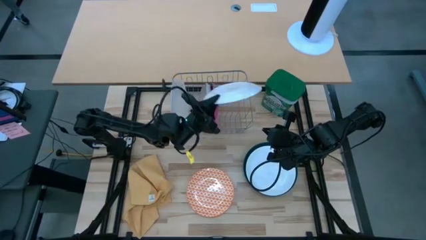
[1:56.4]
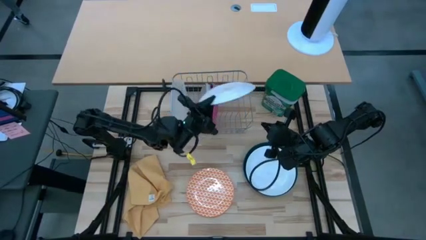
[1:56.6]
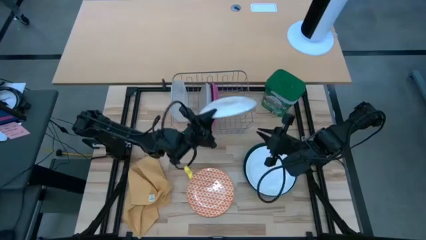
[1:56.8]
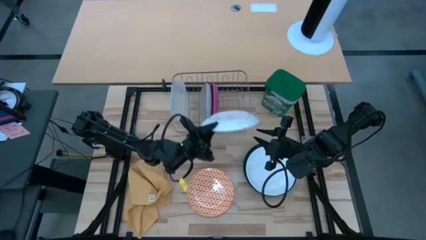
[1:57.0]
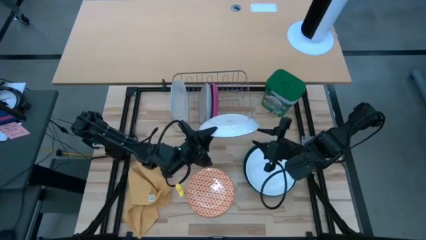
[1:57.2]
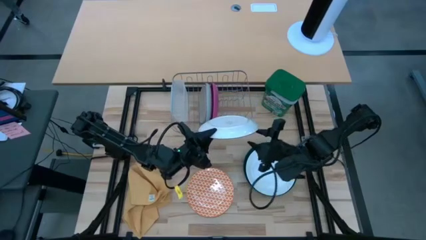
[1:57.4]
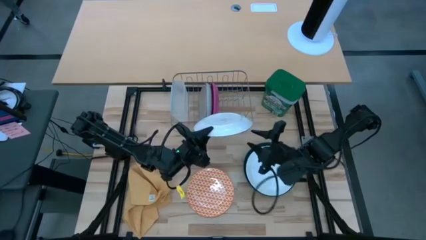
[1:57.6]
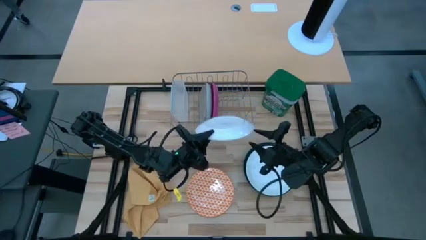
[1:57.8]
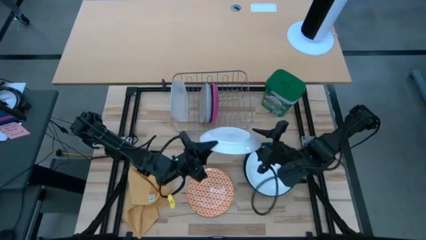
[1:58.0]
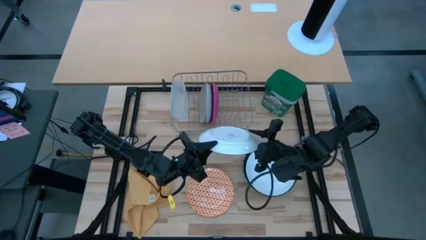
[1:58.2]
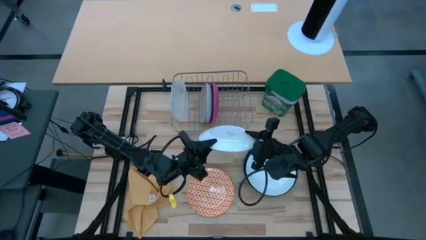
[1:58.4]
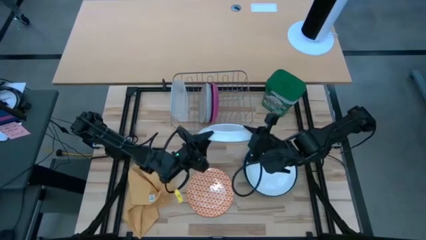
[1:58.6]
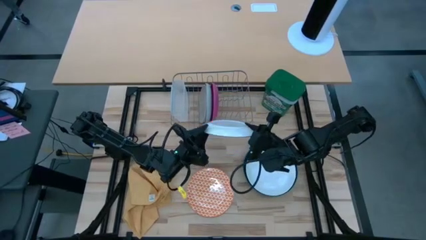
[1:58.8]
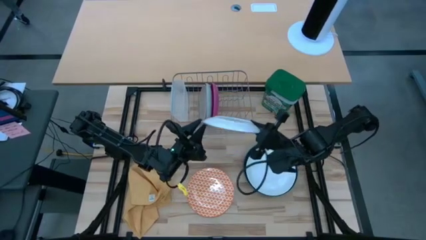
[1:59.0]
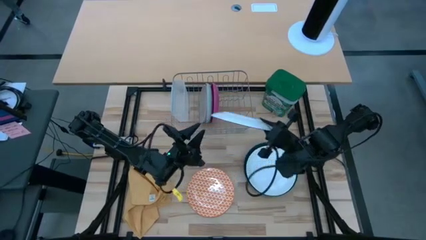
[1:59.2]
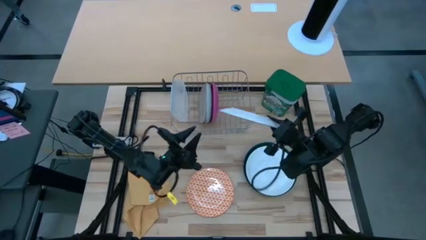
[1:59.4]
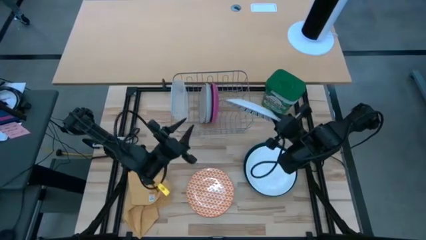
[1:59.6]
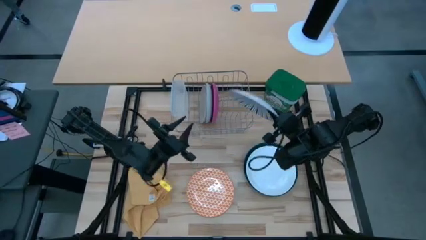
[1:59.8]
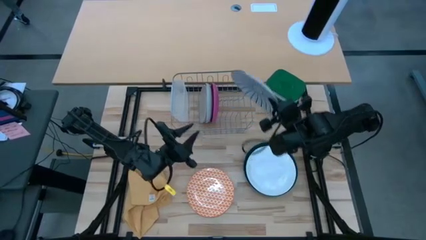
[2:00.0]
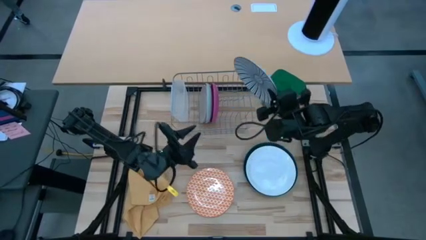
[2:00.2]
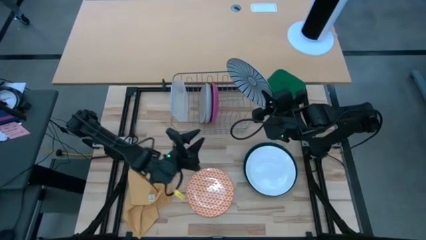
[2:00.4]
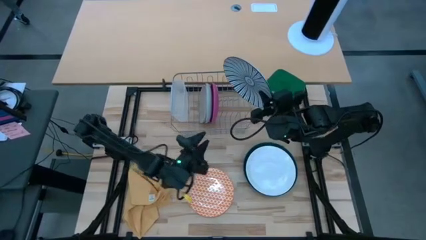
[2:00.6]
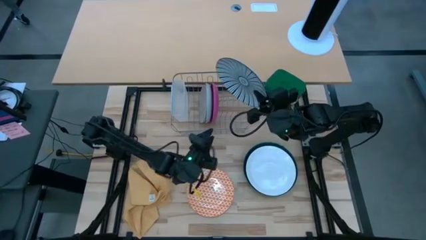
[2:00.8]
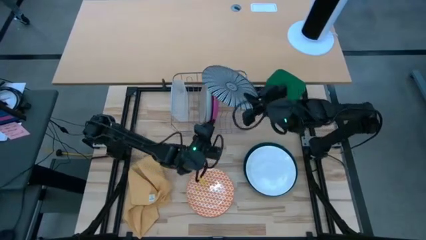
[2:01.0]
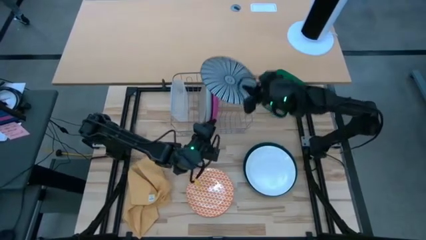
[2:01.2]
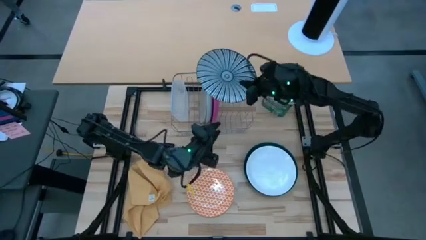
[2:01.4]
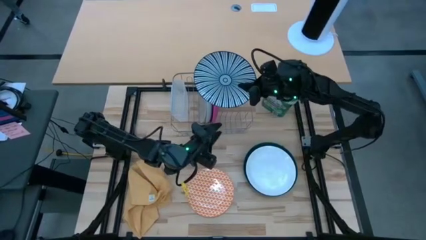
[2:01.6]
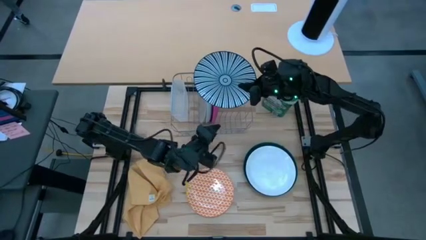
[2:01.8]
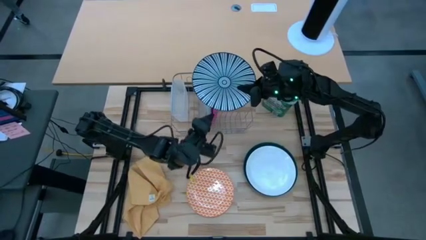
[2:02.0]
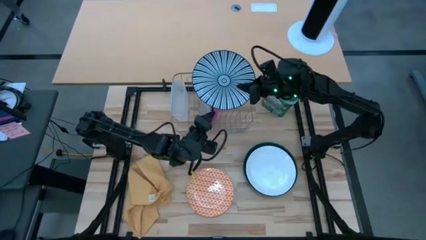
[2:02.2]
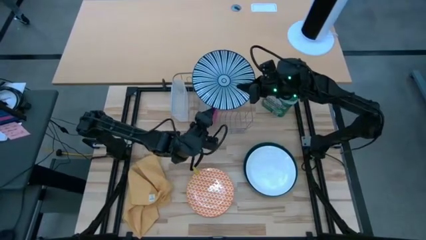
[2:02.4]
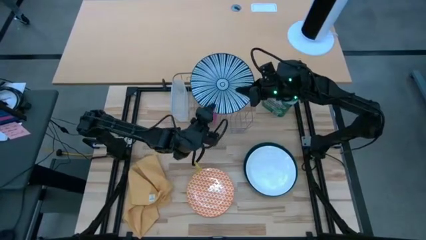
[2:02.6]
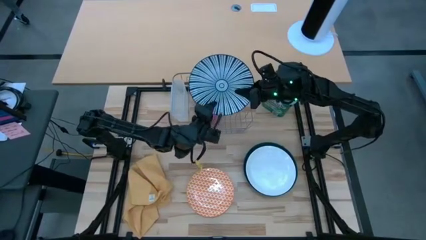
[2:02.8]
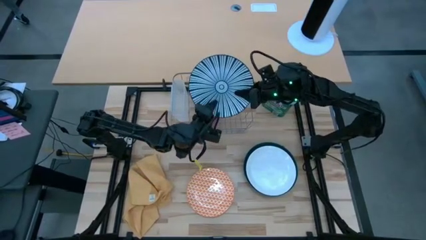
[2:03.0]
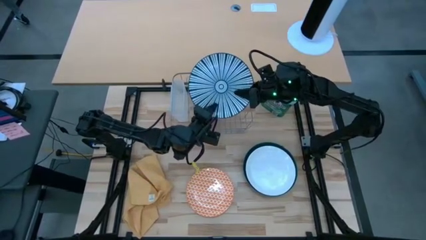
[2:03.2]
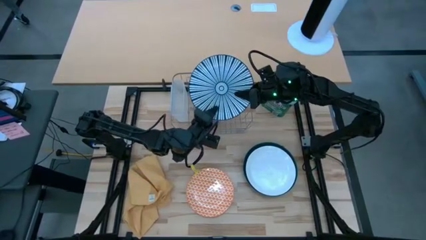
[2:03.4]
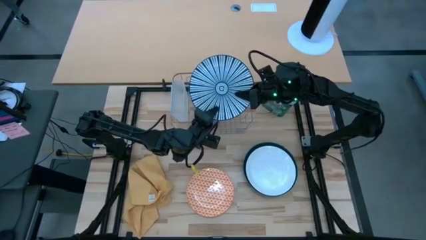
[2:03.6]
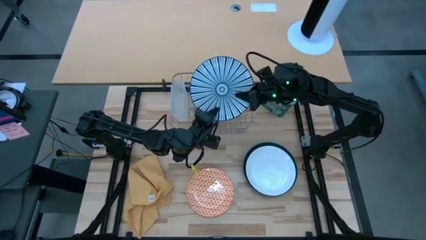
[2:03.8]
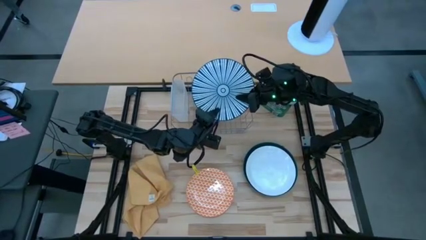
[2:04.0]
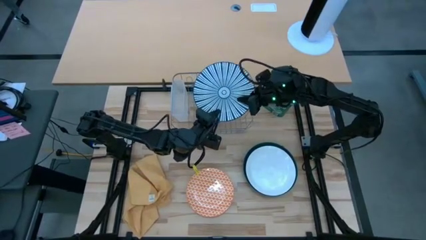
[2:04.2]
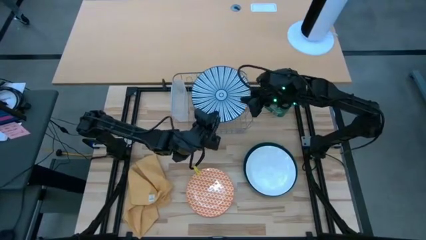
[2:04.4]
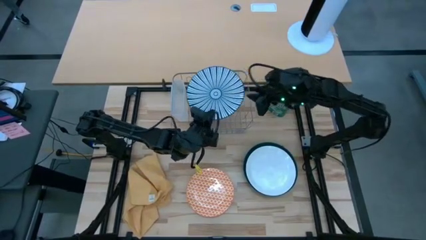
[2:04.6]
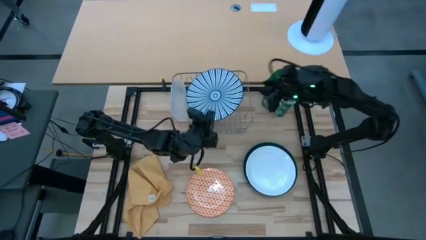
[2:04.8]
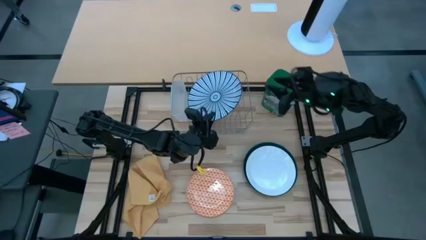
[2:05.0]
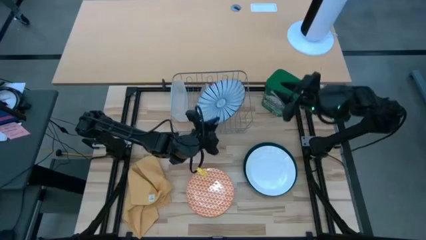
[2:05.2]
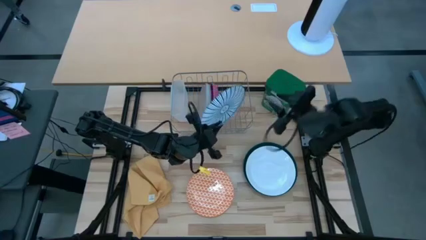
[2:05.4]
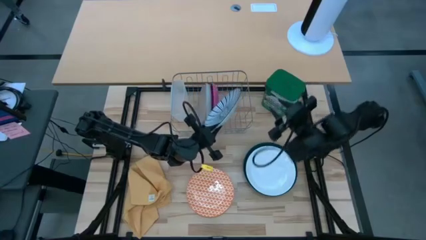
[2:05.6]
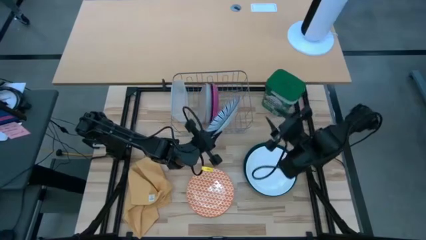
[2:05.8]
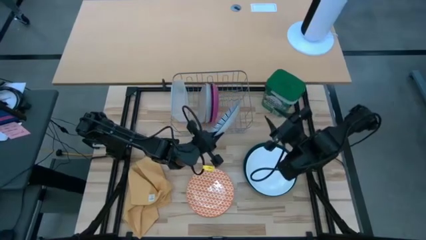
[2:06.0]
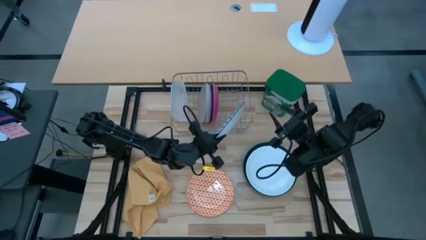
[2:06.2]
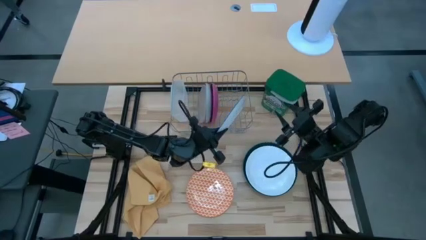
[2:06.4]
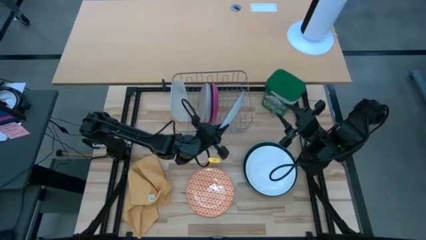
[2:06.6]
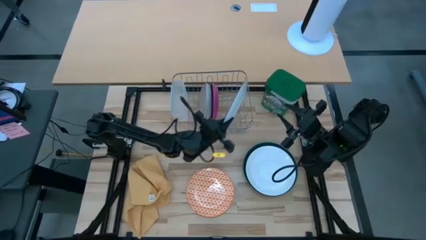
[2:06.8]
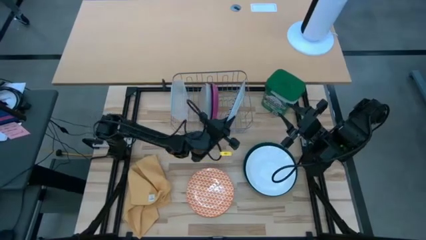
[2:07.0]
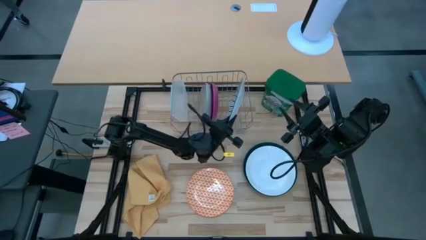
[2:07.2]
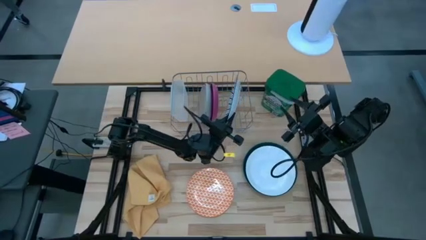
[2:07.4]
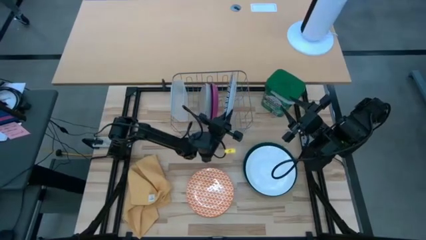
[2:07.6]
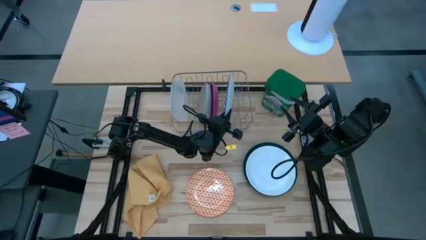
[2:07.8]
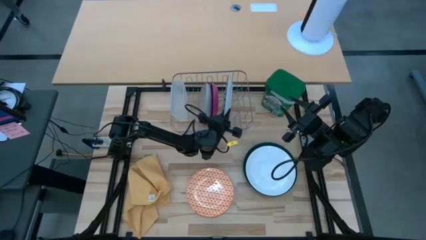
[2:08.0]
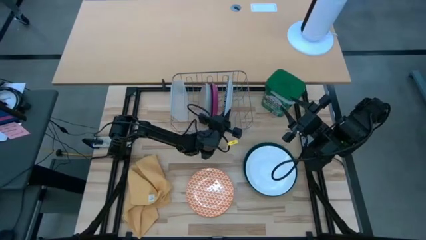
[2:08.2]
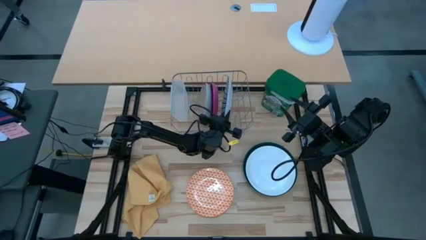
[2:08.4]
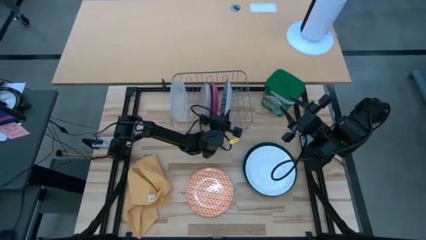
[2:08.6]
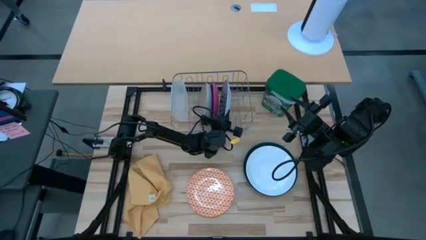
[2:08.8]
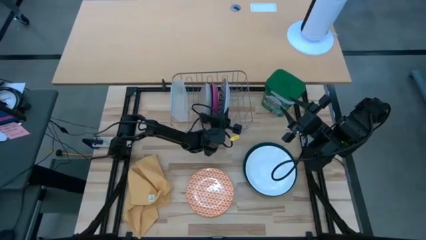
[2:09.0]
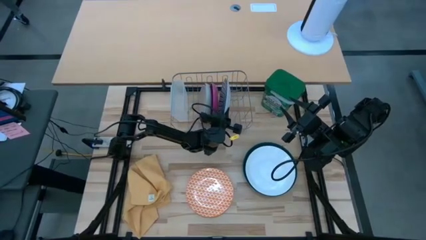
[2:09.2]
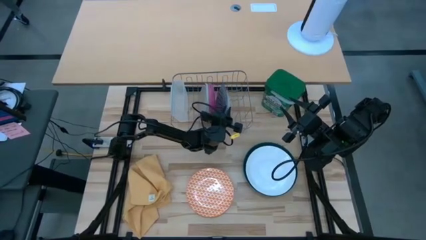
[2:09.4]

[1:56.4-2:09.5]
Task: Sort dishes
Put the blue patterned plate into the dish rack

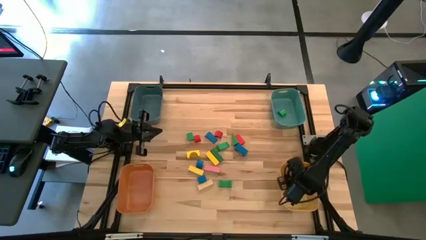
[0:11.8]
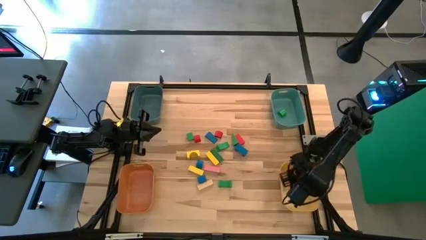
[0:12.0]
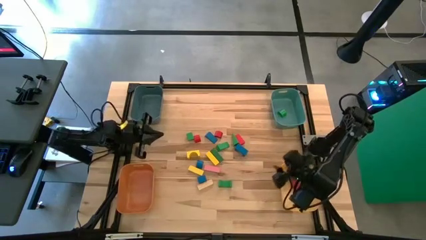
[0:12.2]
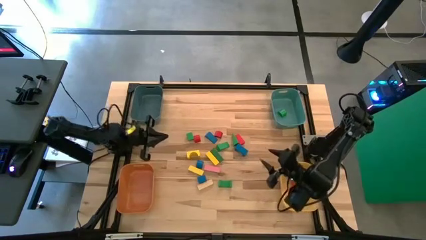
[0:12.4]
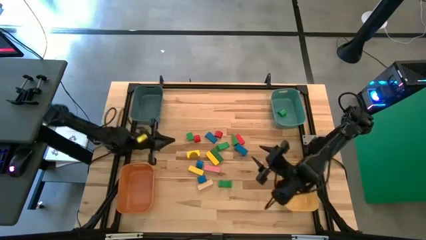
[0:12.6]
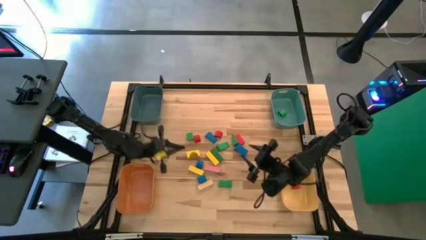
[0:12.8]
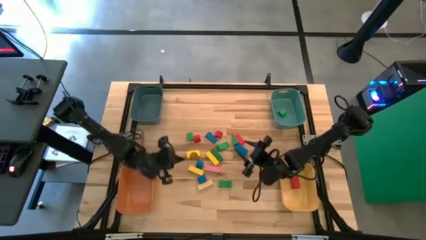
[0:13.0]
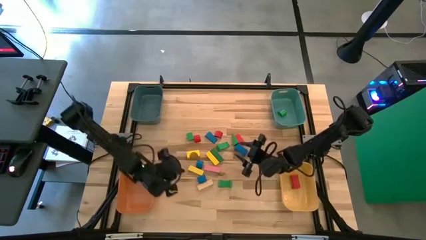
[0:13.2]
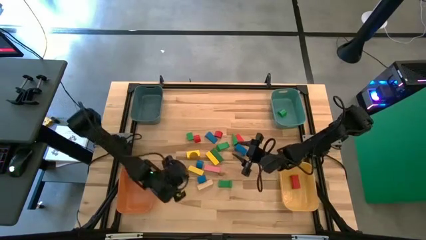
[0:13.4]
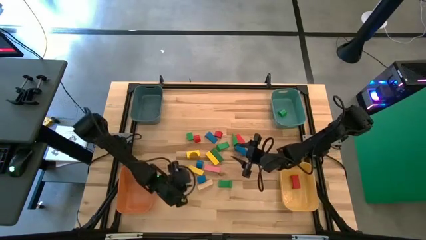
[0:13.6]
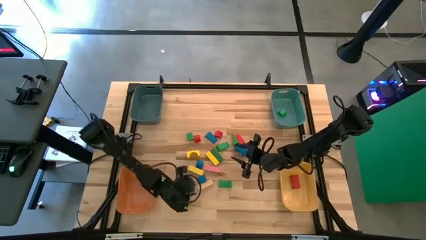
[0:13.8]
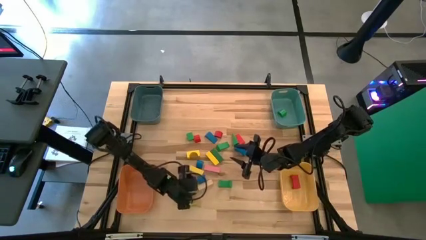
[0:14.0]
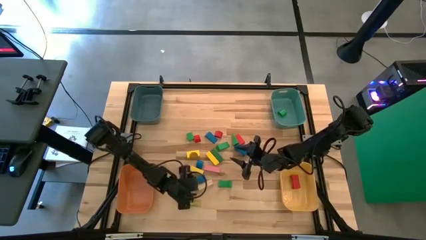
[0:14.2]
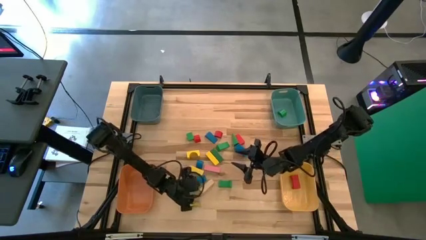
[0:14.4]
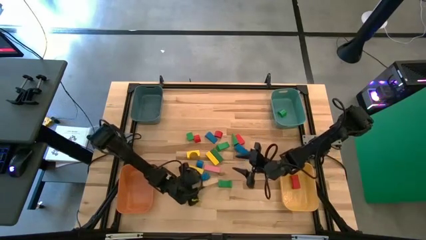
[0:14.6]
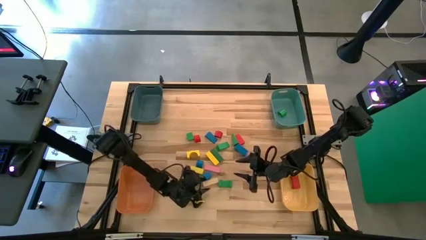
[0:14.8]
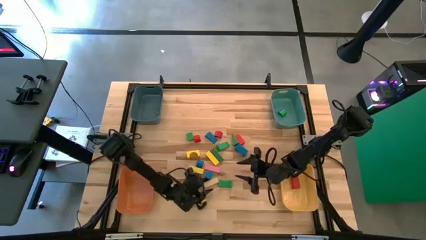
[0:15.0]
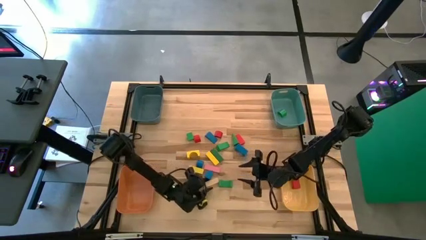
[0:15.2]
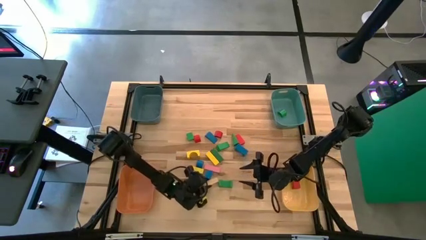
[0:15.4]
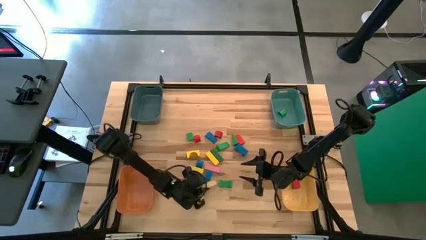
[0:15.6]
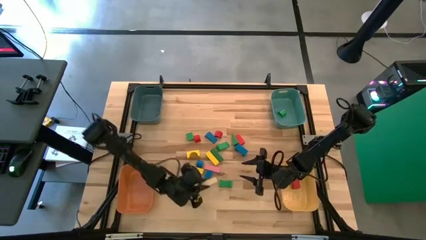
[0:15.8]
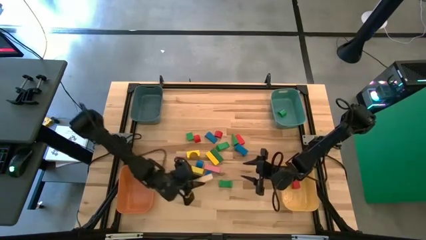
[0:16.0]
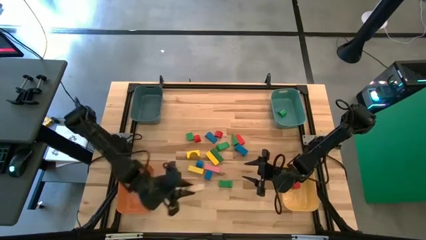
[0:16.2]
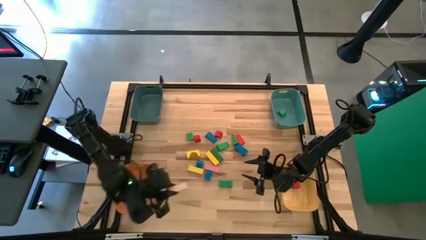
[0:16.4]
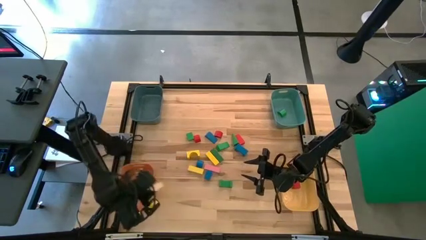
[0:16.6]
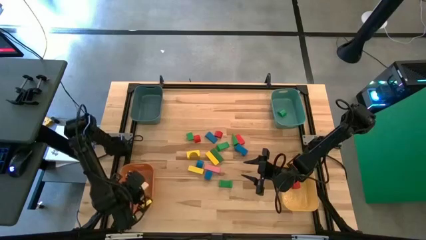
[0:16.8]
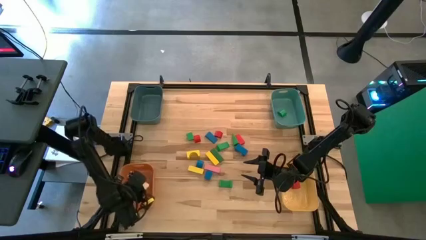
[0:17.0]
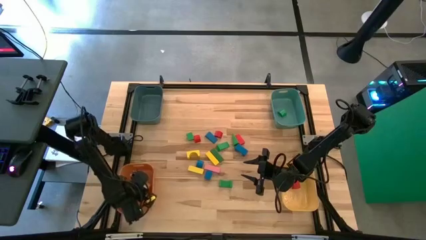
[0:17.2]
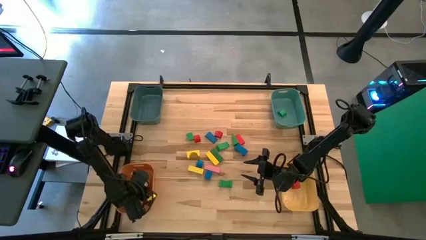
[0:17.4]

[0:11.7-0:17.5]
Task: Sort blocks by size
Put the brown rectangular block into the orange bin
